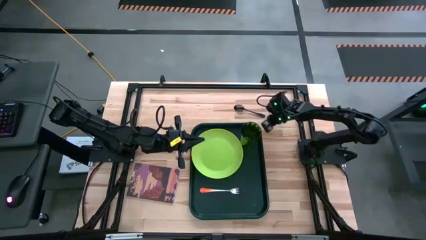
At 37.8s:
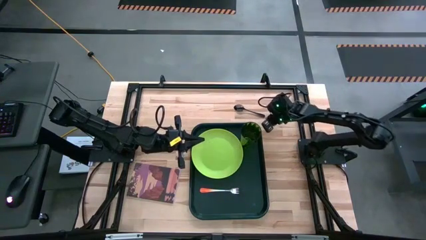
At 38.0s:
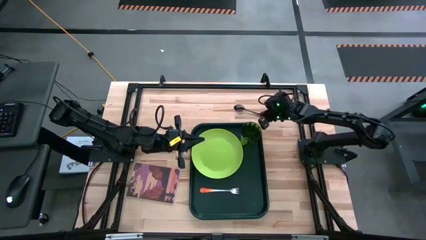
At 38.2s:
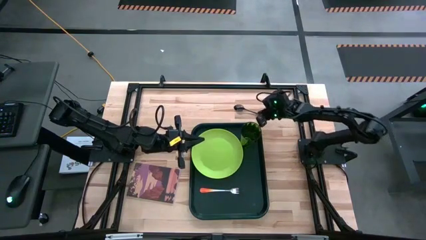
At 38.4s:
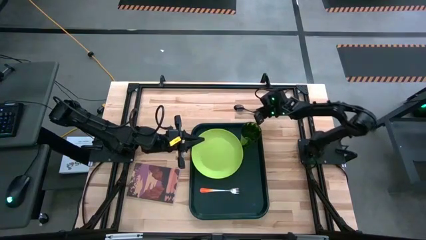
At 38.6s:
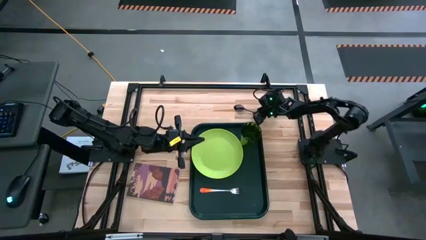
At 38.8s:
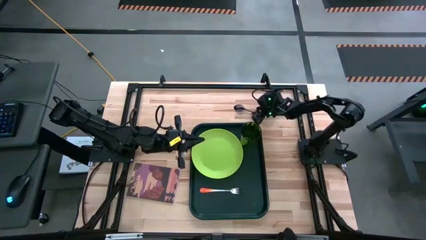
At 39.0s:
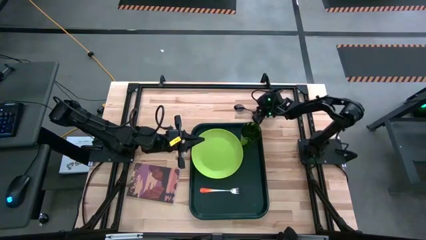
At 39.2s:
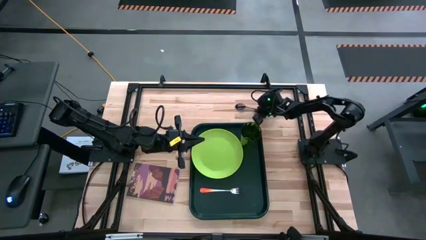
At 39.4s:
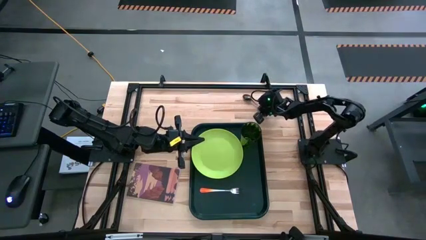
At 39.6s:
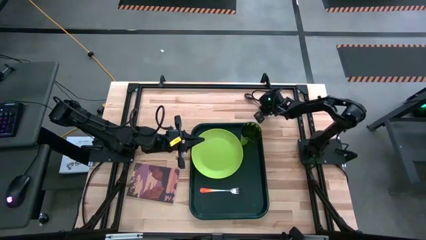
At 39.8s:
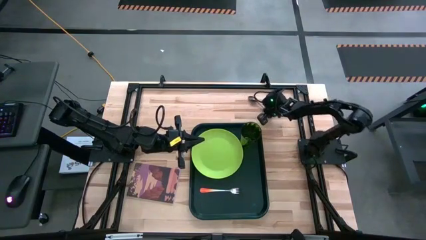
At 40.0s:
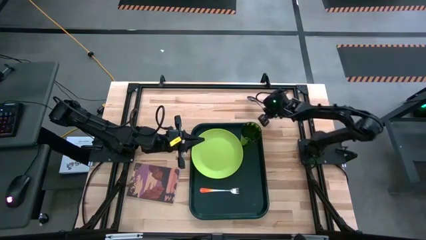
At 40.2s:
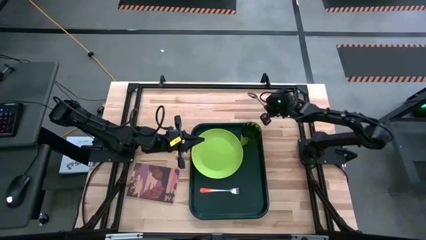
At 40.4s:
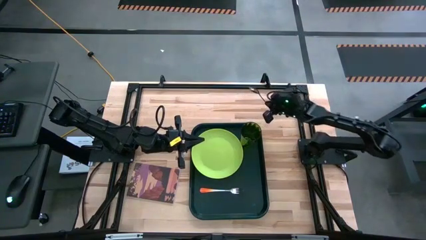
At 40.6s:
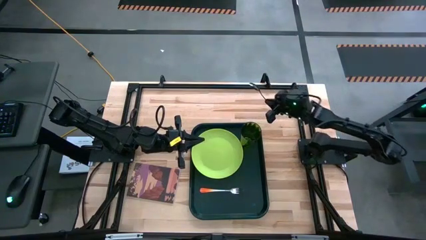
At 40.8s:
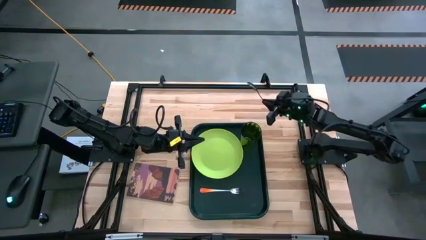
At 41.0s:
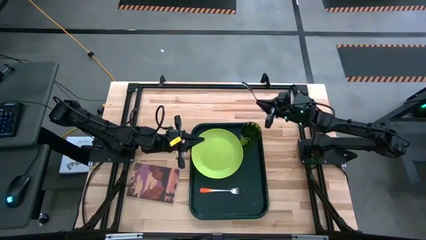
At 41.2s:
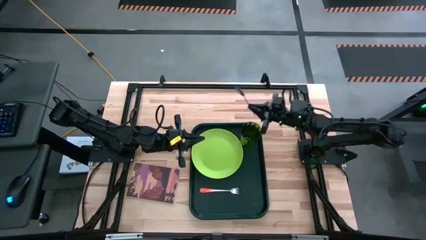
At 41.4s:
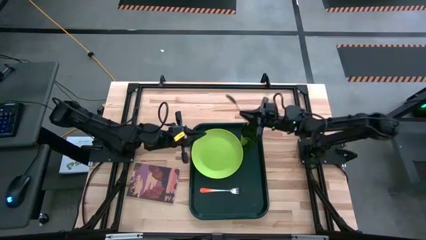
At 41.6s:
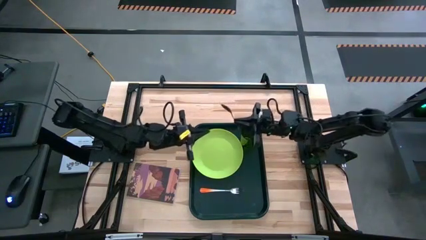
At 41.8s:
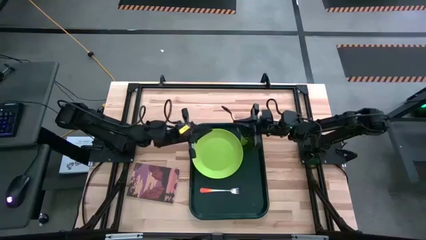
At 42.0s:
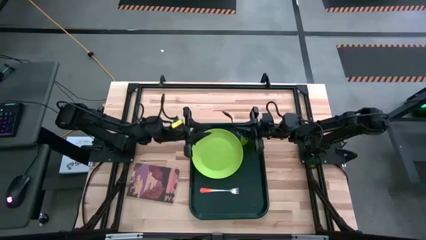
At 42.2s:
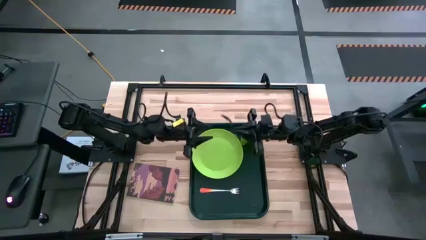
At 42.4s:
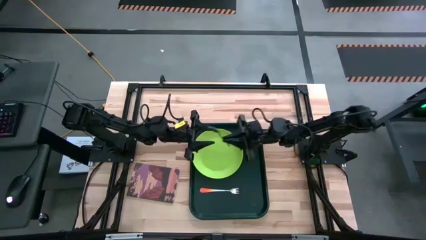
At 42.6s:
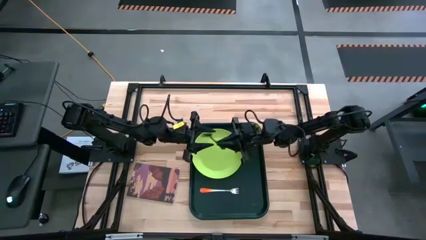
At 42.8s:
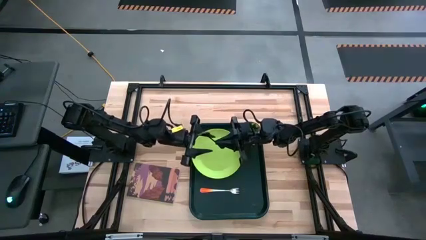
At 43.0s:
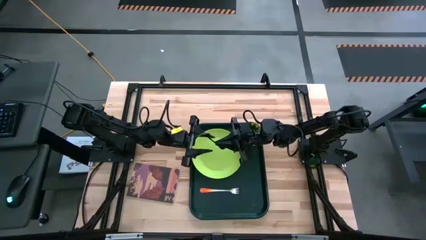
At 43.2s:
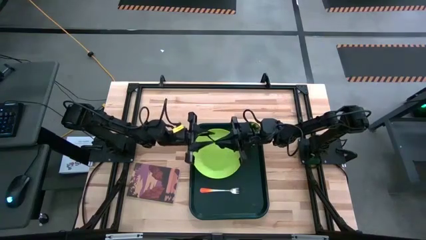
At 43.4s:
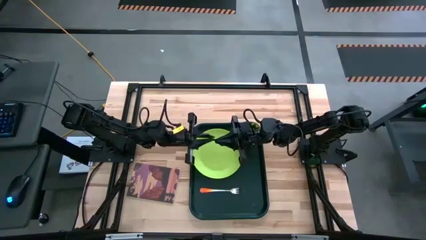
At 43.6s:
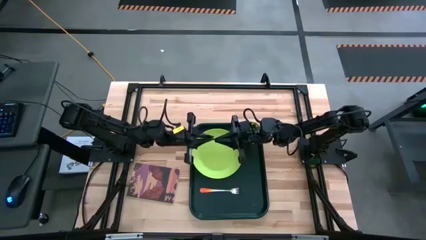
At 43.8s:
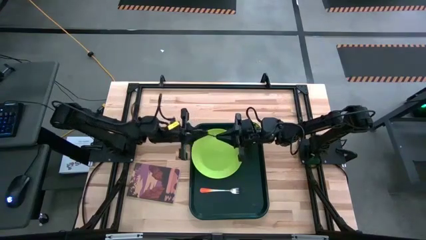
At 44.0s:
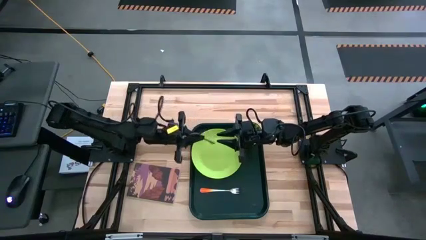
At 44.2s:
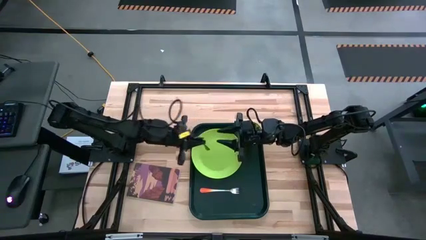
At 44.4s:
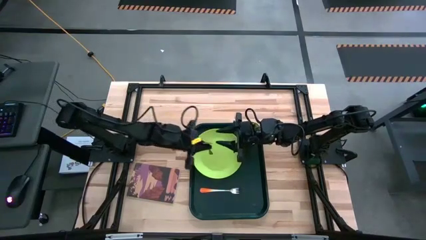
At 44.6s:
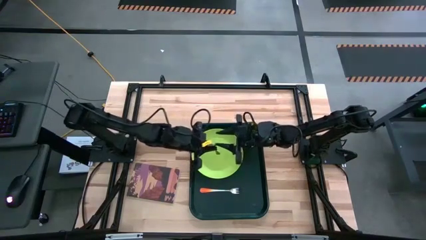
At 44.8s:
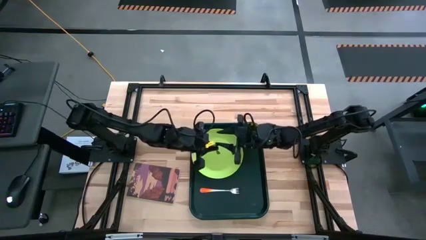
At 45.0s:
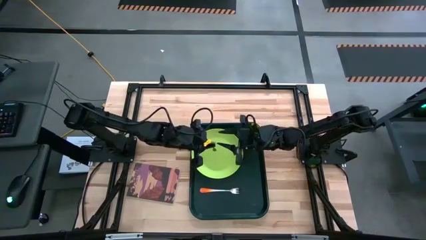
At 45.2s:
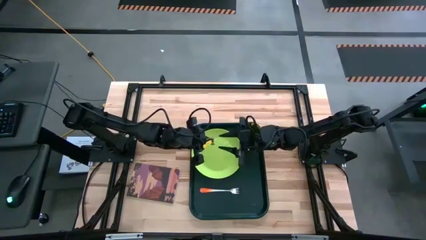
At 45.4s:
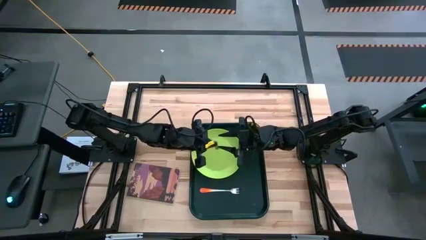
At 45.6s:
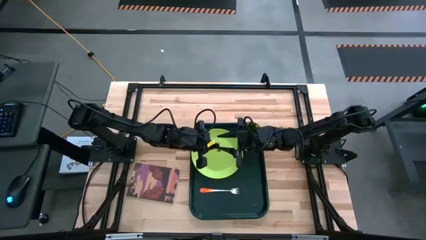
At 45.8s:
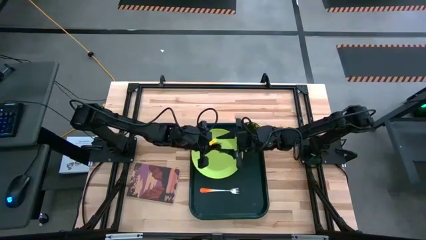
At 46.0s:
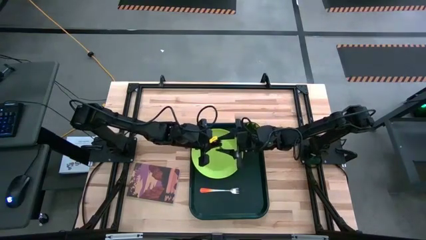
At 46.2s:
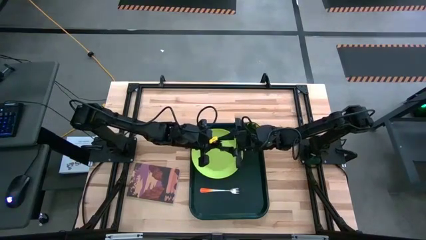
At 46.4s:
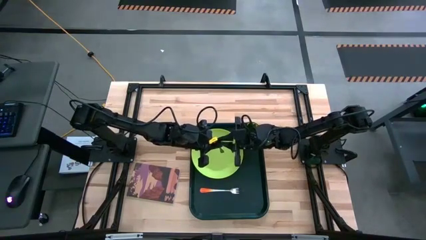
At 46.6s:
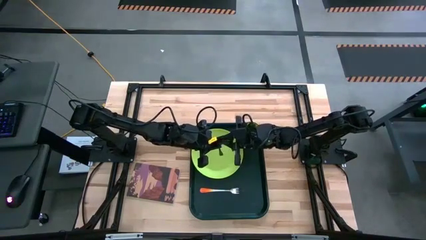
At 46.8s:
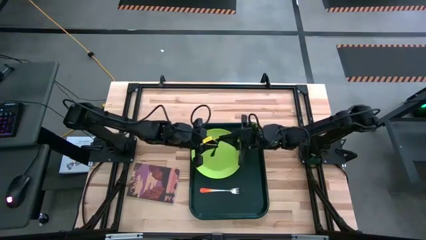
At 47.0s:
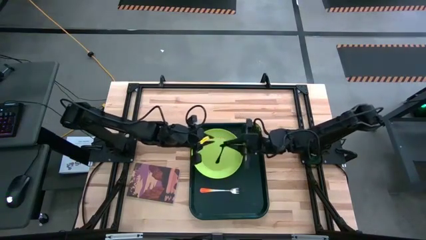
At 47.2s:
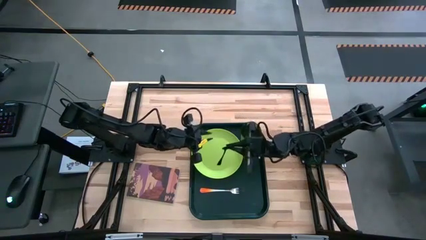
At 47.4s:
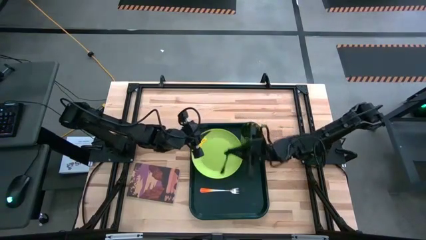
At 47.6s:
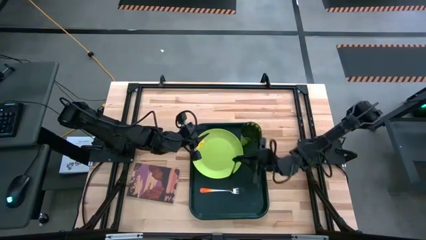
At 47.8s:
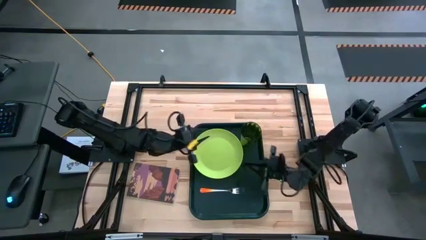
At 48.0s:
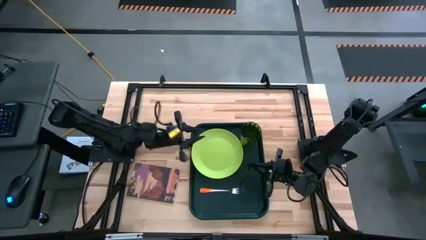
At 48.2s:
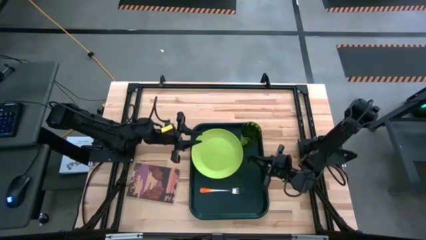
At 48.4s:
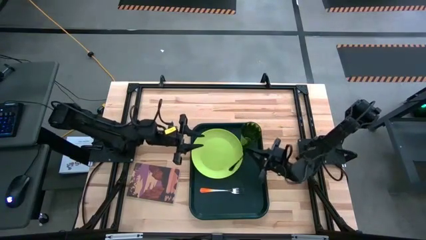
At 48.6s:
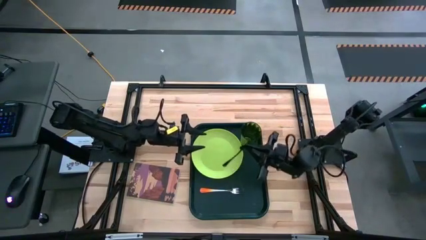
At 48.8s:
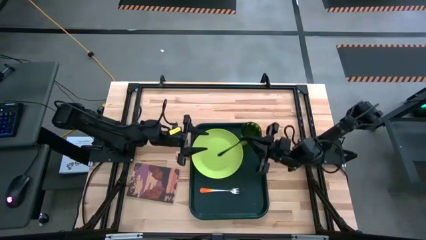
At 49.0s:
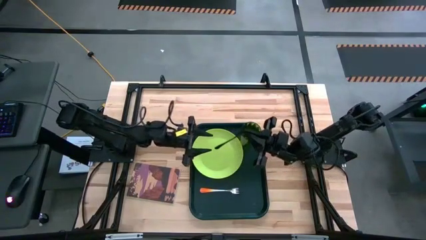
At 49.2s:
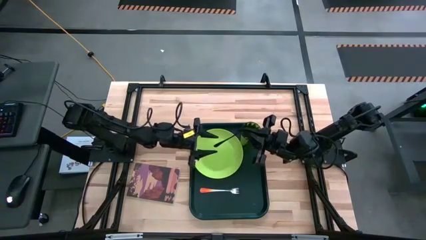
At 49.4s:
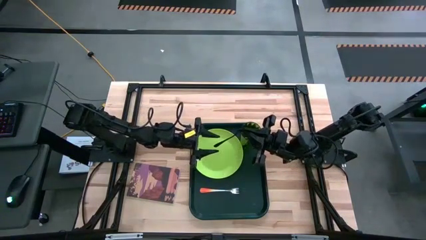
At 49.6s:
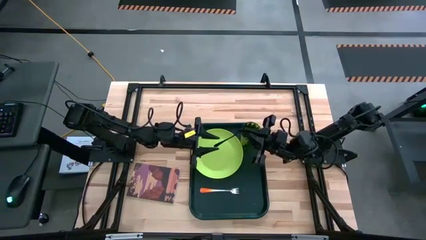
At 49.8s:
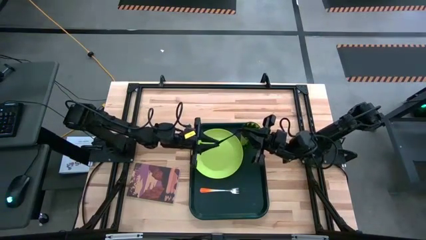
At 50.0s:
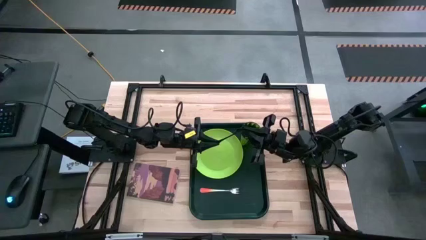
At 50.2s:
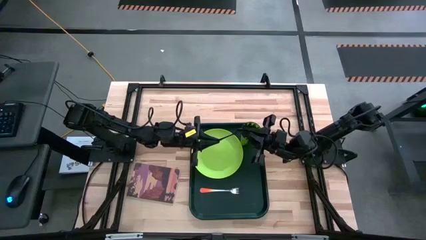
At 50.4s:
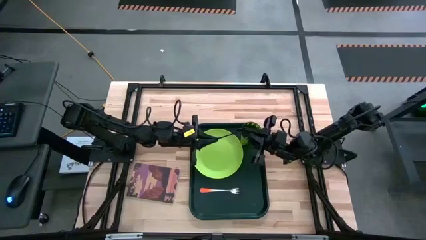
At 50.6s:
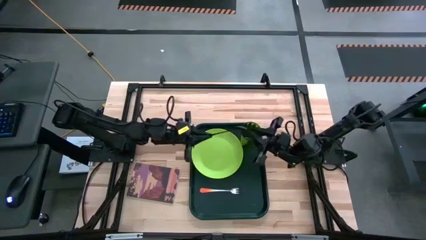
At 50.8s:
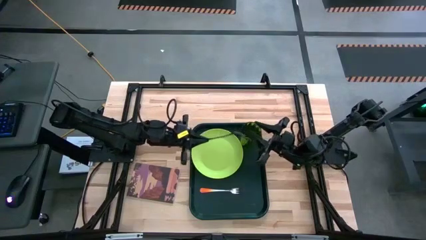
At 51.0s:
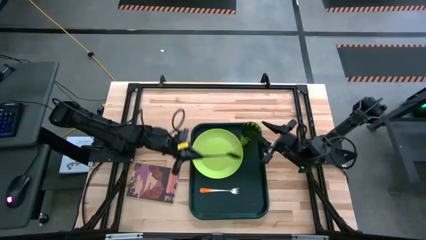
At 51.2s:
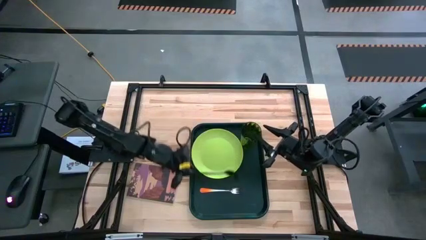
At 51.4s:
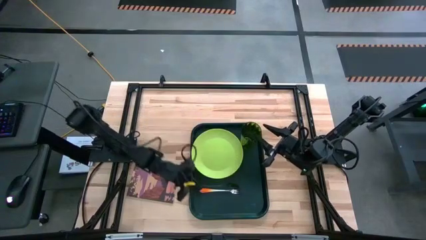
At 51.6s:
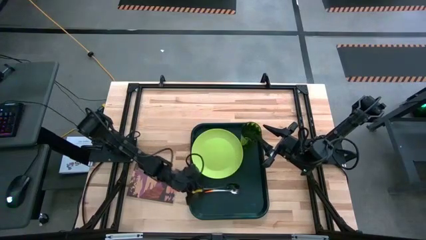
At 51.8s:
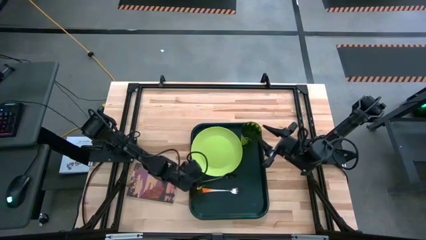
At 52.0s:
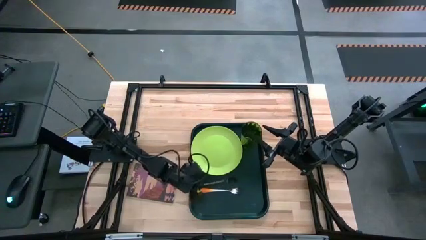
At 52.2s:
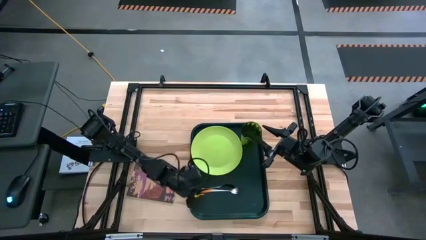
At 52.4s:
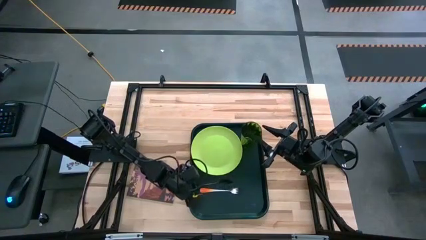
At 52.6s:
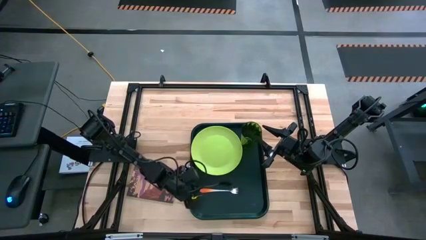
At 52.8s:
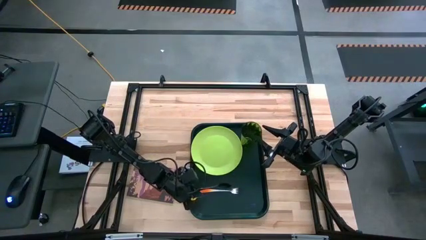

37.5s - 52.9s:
Task: Pick and place plate/cup/fork/spoon on tray
Put the black spoon on the black serving tray in between the green plate and orange fork
